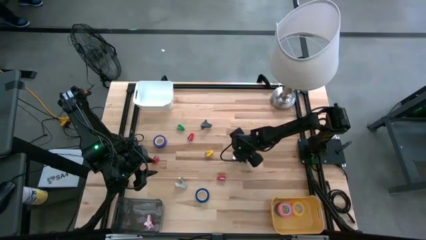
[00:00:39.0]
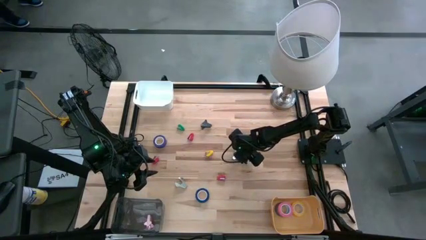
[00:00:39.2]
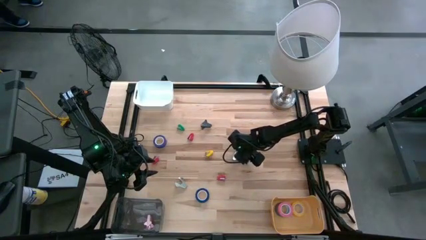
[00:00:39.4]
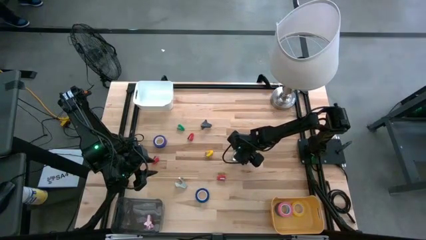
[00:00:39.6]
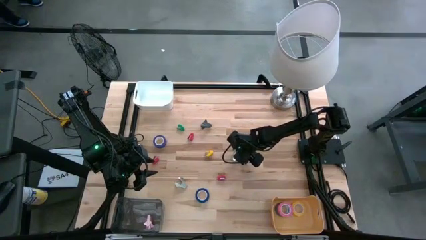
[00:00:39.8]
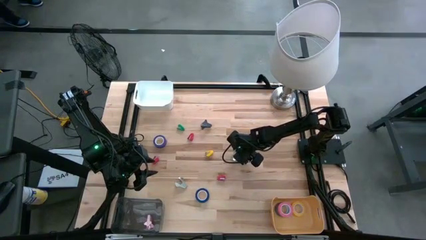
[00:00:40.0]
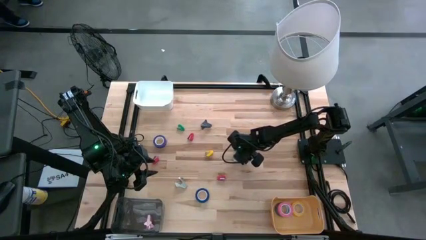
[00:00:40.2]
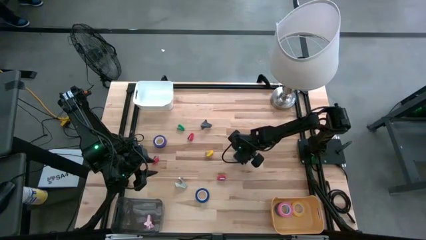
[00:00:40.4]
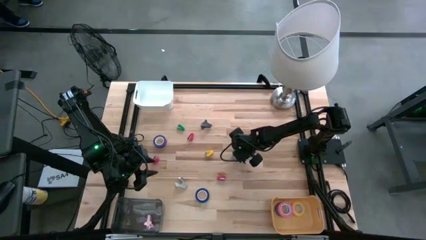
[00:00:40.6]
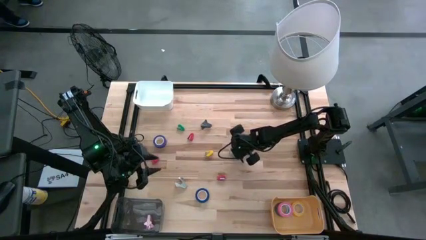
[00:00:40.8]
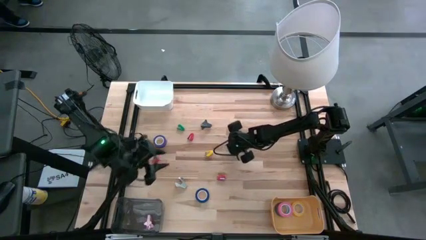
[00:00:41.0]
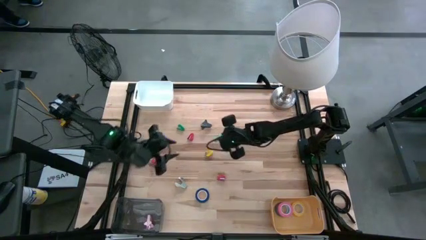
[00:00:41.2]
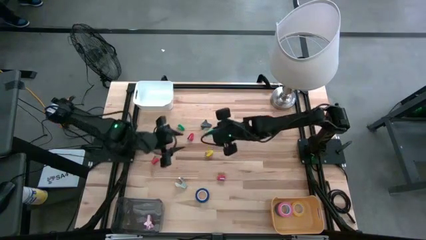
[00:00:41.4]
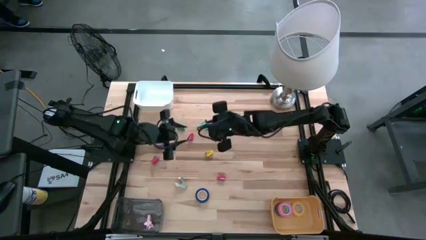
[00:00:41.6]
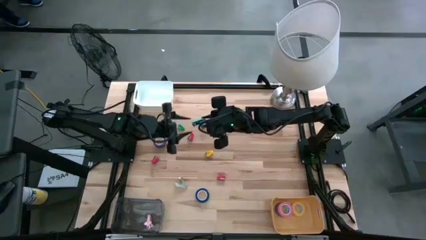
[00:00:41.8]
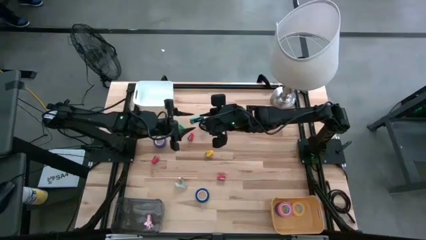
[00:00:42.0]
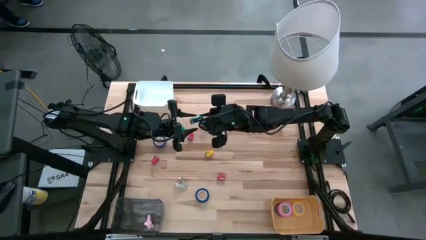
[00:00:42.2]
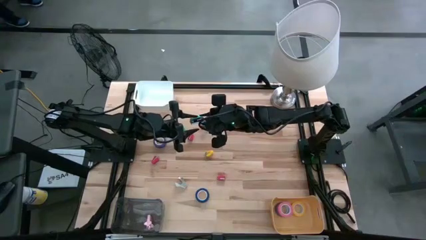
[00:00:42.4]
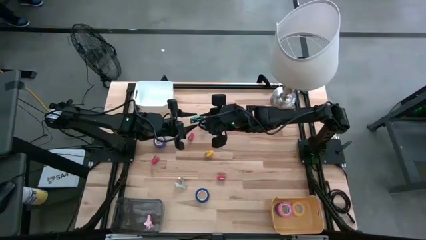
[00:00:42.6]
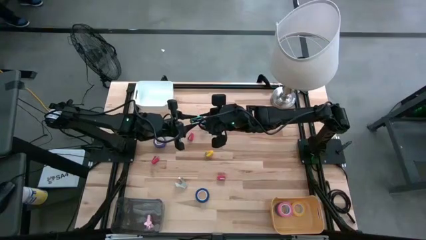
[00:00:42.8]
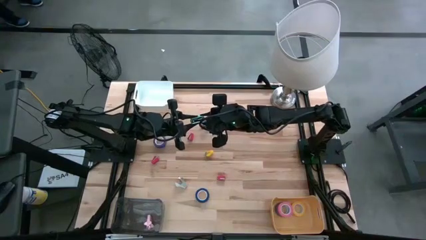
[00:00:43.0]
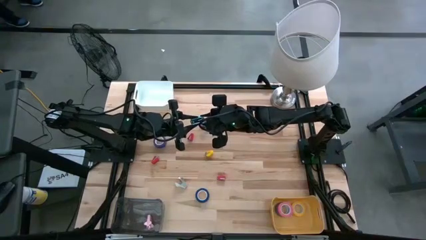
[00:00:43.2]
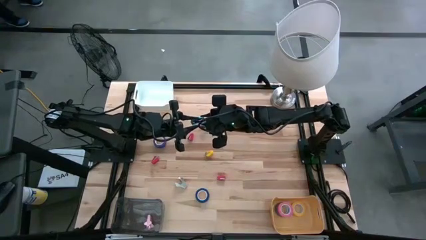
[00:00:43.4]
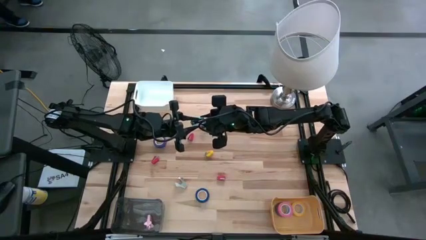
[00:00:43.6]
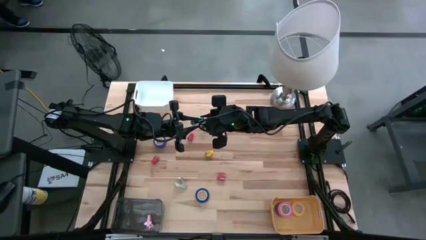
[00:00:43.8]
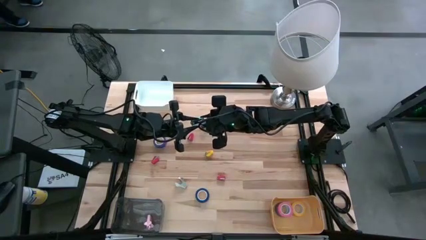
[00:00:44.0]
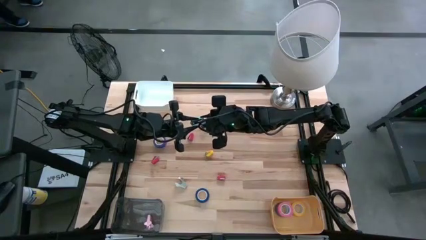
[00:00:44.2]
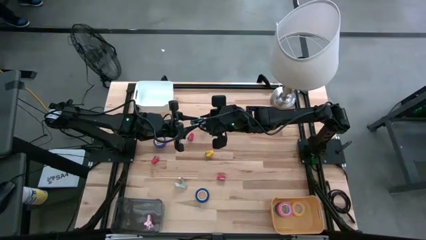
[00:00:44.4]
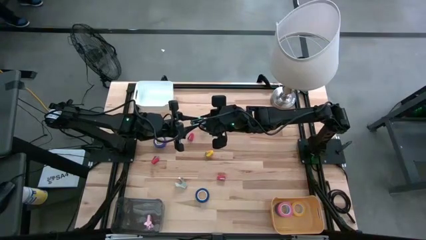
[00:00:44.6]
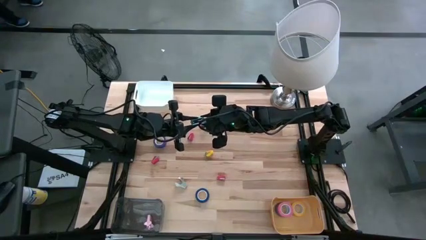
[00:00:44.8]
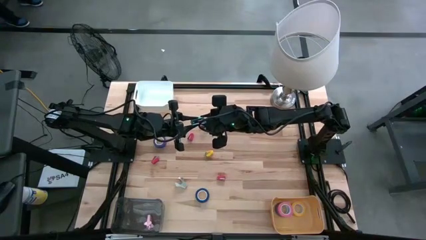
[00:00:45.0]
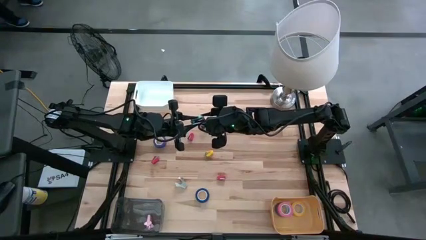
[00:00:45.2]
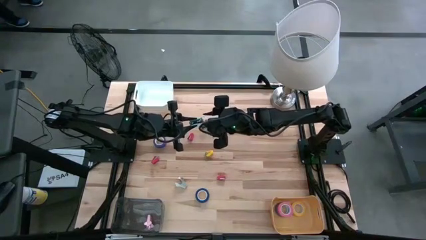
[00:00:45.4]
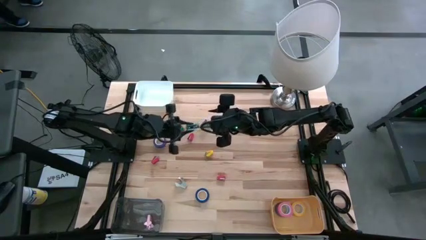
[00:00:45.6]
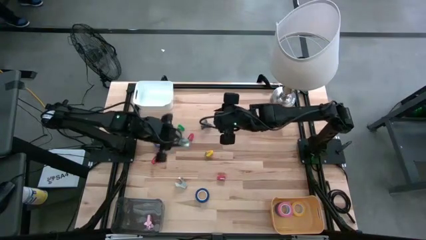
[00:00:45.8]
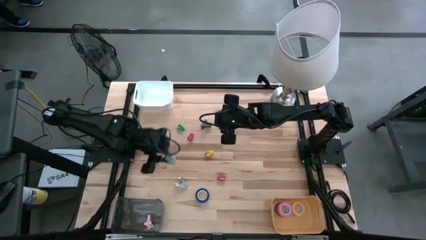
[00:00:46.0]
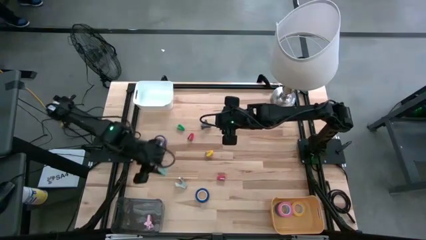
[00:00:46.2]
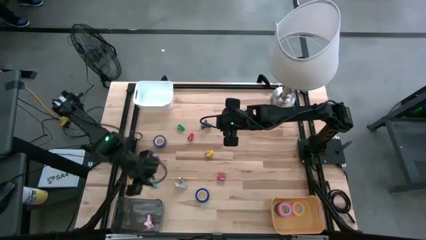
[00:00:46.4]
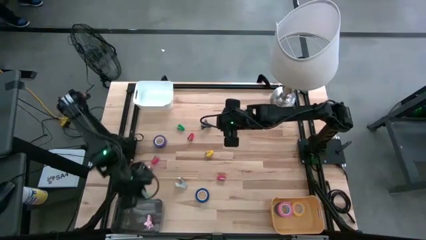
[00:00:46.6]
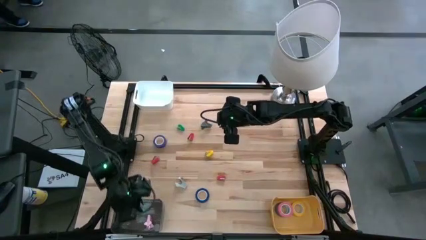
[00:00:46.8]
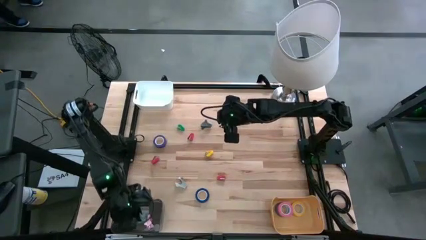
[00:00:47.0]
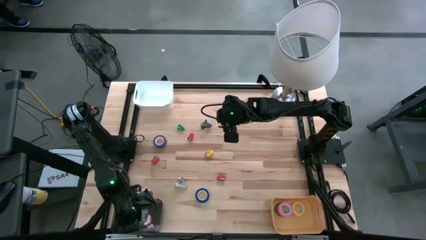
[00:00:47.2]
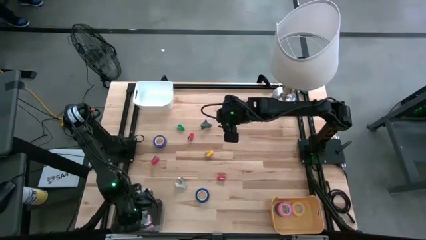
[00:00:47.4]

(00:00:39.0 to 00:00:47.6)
Task: Pick and place Stapler, Stapler remover, tape
Put the blue staple remover into the black bin

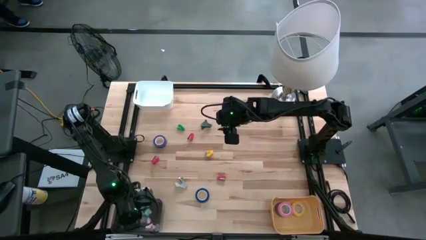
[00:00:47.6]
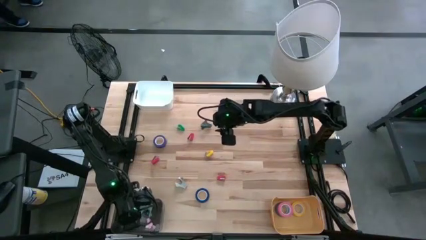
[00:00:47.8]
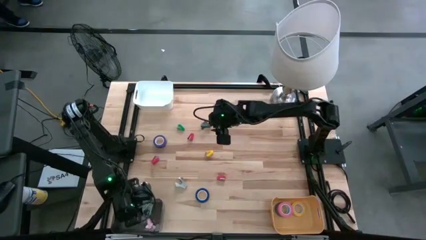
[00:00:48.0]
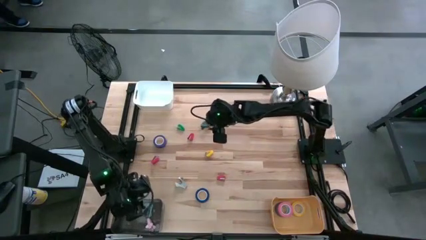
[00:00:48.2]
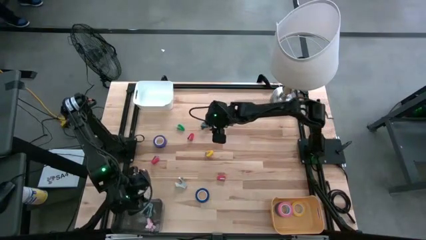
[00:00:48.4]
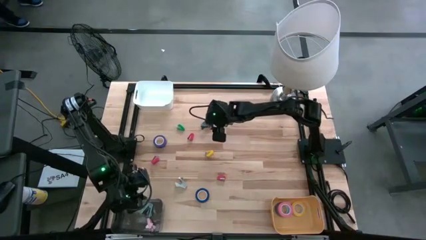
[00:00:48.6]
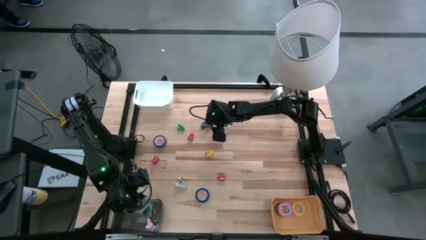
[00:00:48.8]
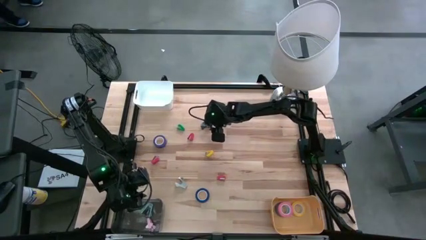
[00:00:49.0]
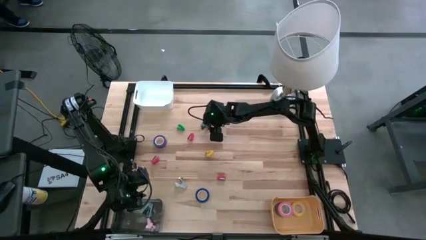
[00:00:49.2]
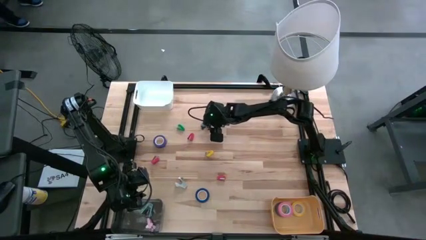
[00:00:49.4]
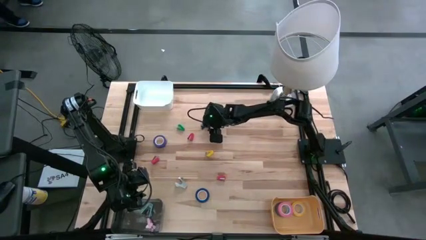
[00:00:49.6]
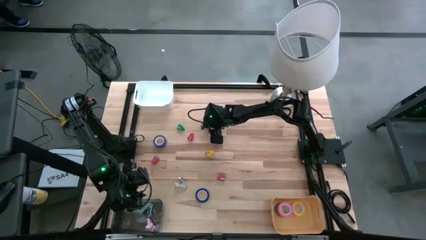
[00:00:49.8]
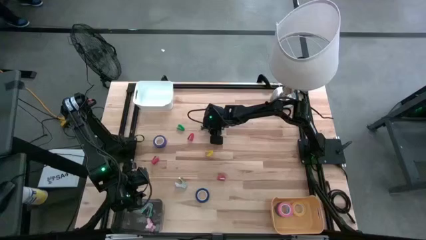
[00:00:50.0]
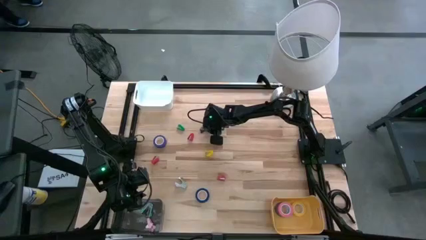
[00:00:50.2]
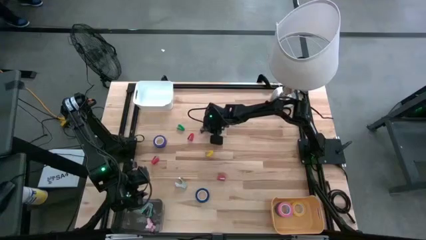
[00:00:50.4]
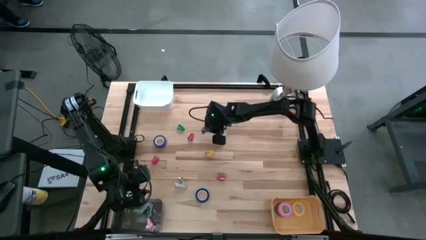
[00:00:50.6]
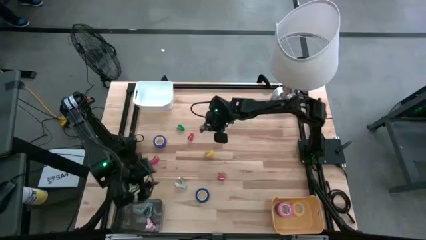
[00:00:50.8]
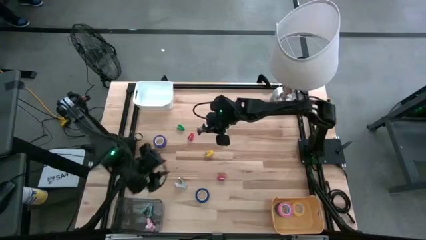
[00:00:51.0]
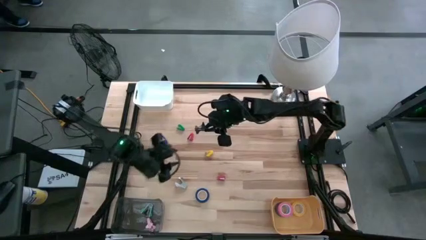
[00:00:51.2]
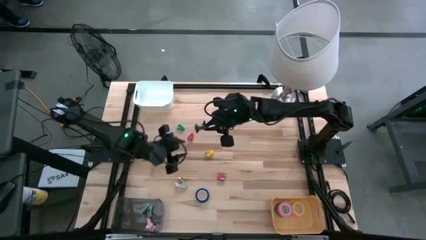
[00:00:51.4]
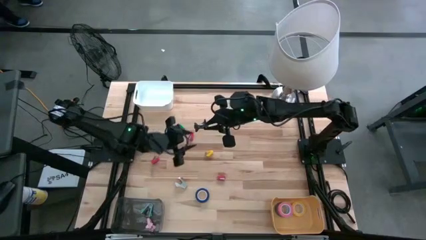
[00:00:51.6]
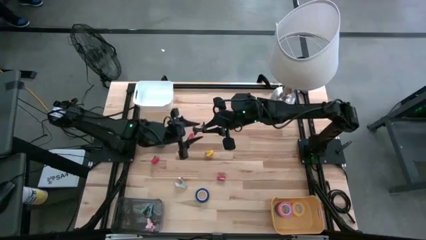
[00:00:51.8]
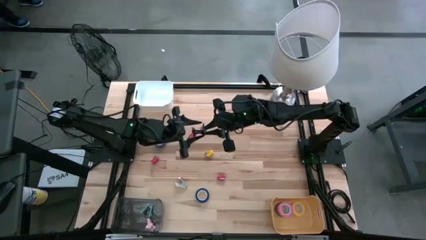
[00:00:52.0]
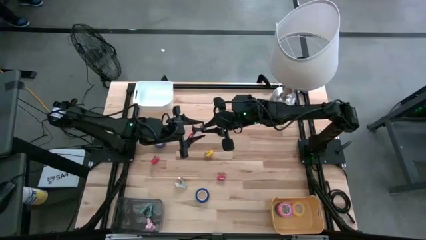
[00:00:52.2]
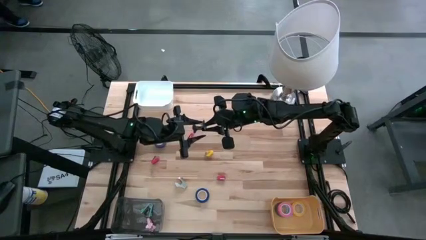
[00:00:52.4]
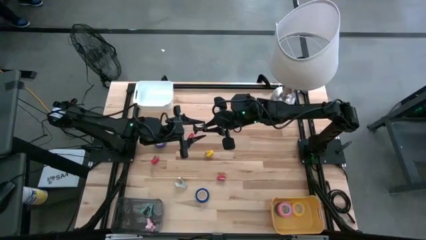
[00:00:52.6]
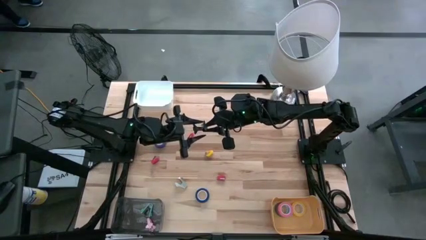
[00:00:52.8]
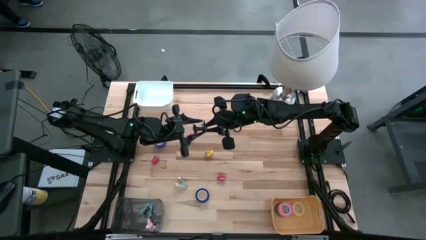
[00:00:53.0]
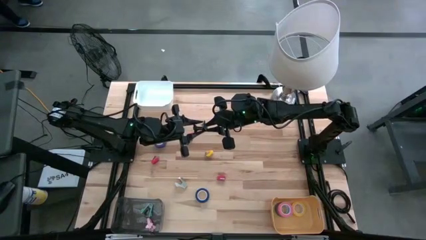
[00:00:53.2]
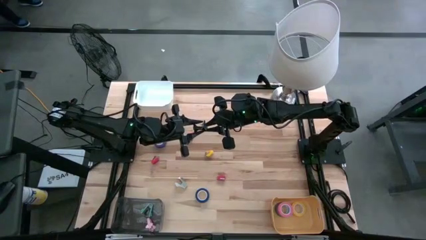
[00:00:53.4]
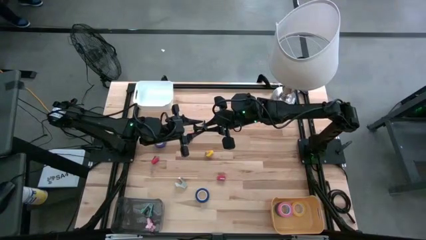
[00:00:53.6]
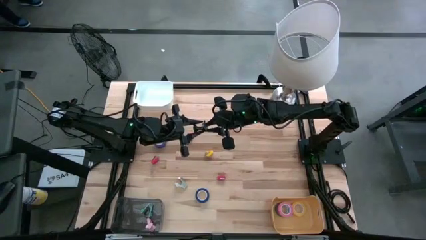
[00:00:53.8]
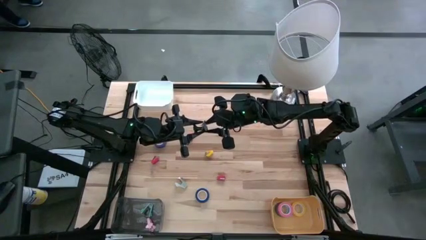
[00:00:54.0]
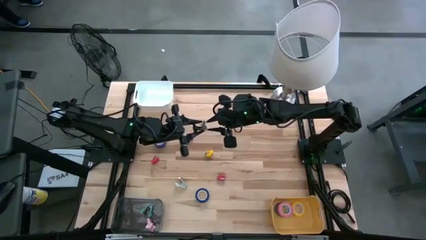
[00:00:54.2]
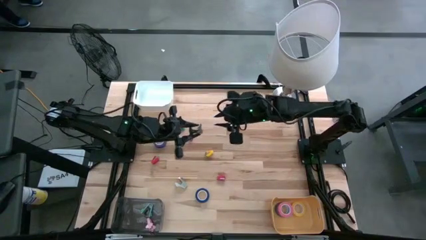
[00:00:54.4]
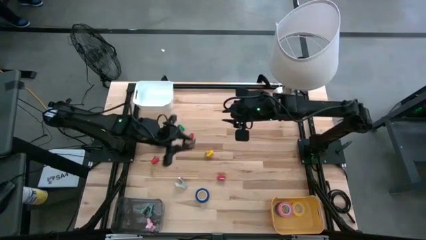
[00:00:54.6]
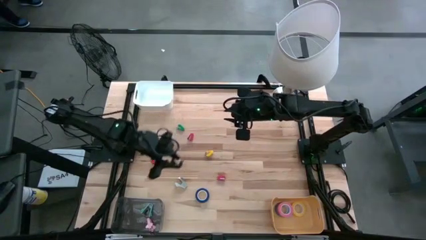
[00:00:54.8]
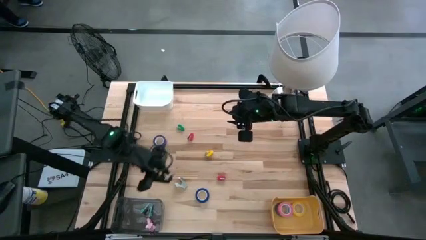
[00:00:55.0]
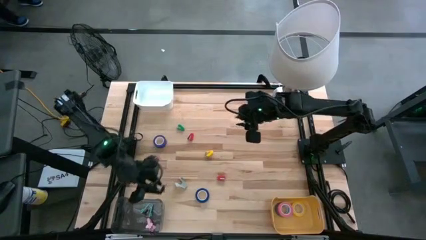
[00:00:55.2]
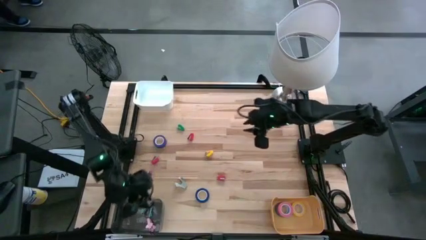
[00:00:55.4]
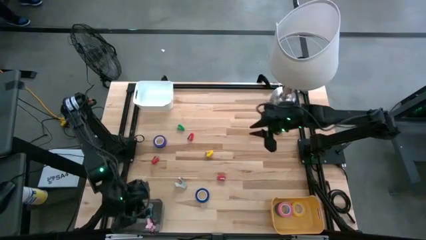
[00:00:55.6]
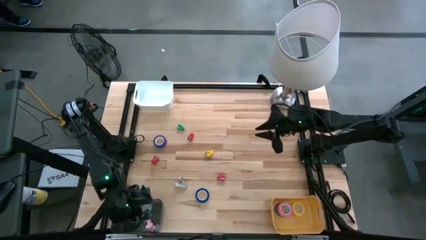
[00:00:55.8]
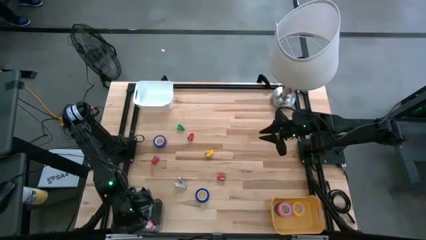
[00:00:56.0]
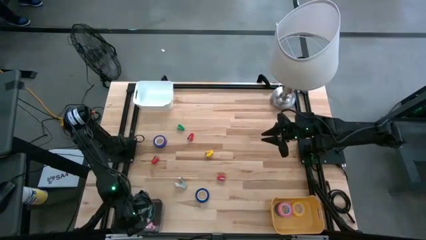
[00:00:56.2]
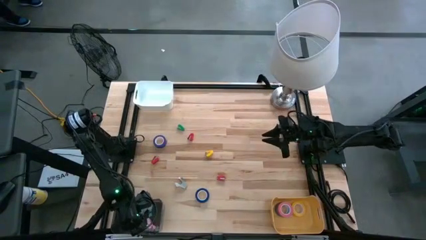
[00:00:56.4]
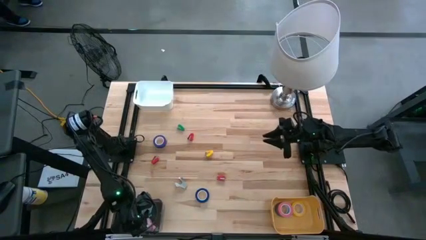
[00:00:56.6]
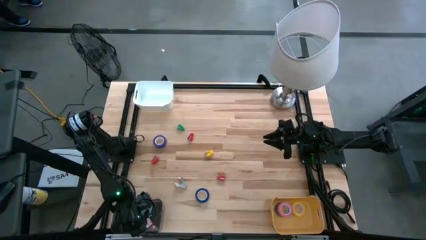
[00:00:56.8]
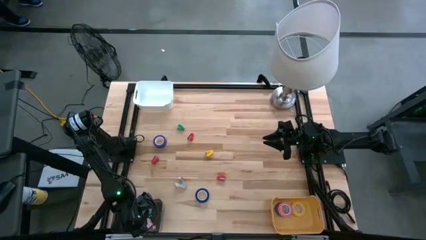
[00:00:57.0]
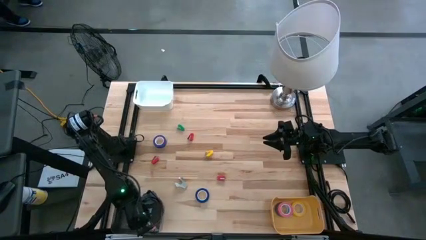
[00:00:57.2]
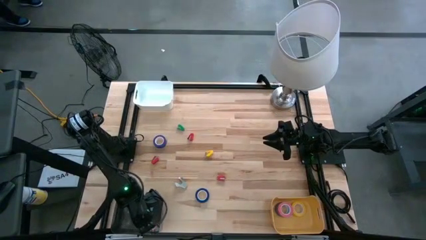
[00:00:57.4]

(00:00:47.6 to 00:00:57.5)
Put the black staple remover into the black bin
